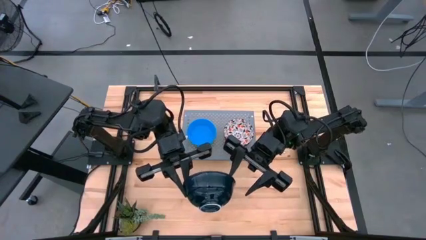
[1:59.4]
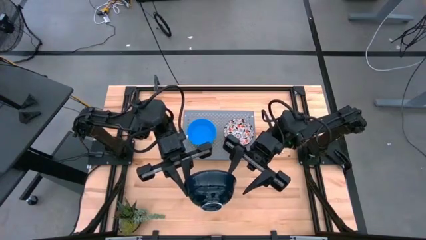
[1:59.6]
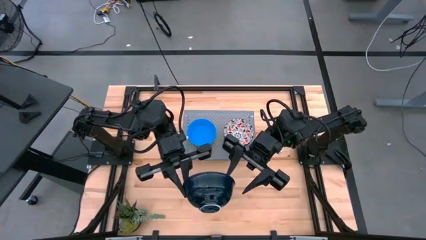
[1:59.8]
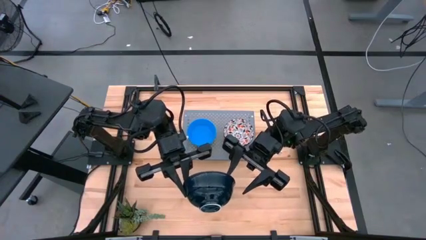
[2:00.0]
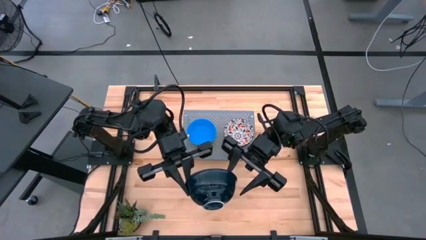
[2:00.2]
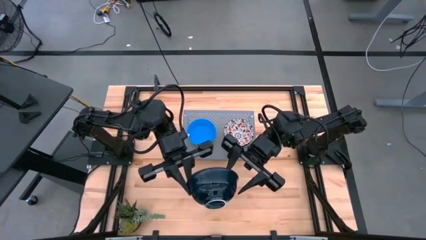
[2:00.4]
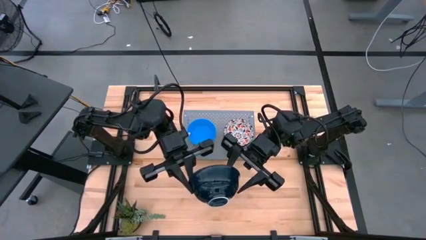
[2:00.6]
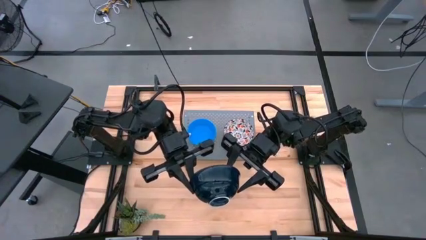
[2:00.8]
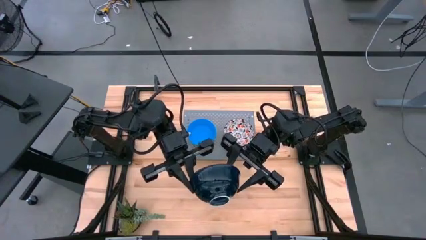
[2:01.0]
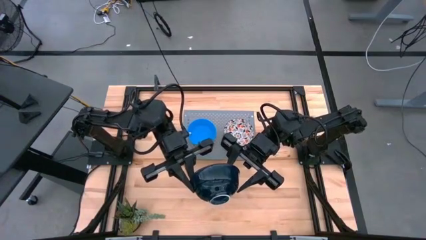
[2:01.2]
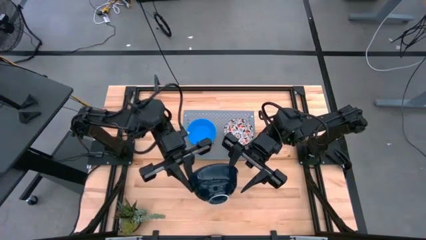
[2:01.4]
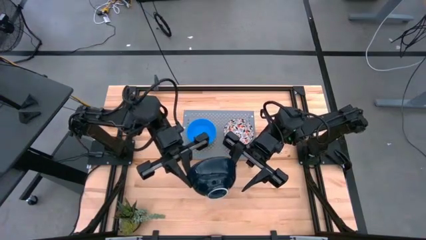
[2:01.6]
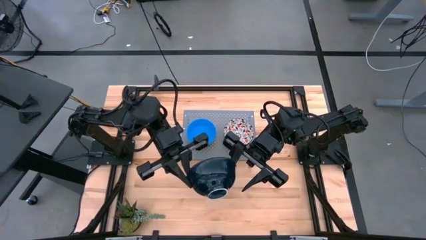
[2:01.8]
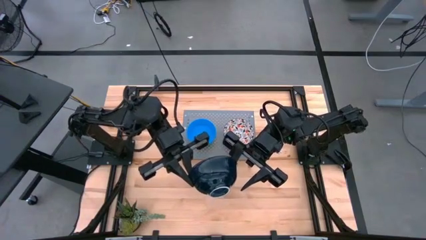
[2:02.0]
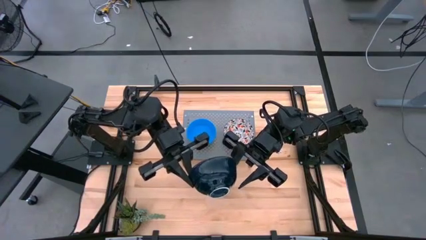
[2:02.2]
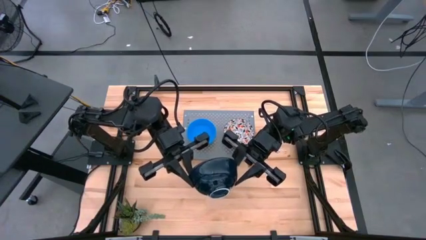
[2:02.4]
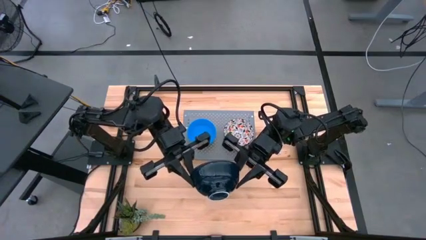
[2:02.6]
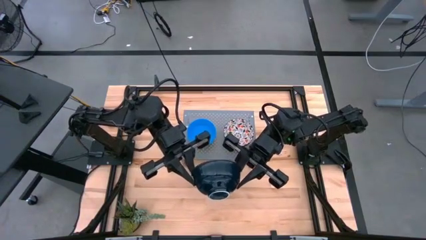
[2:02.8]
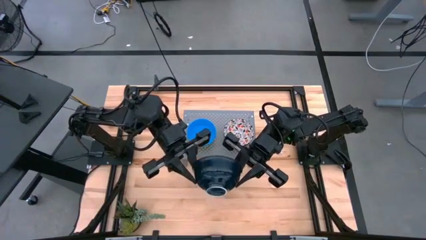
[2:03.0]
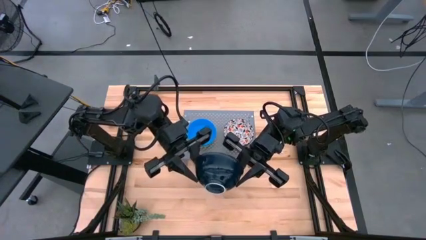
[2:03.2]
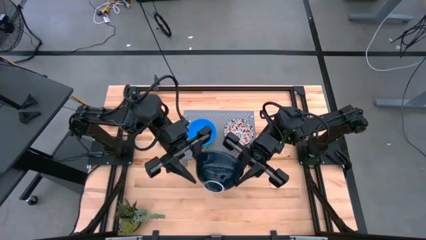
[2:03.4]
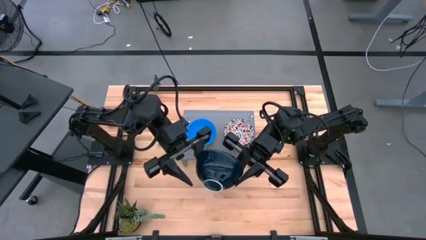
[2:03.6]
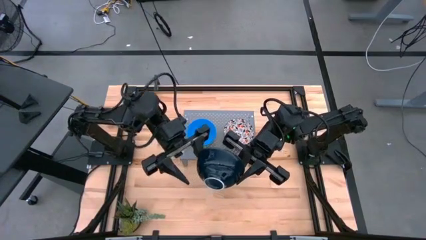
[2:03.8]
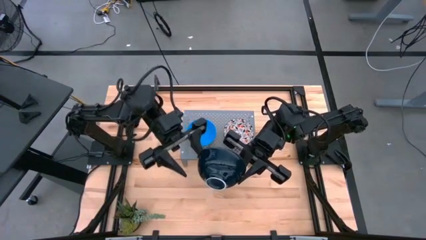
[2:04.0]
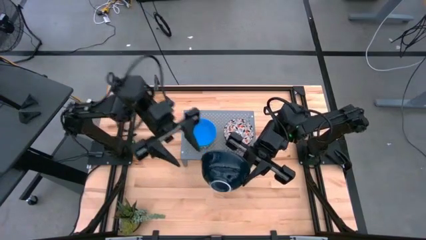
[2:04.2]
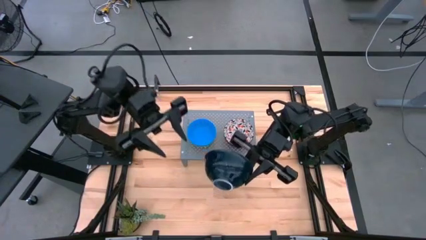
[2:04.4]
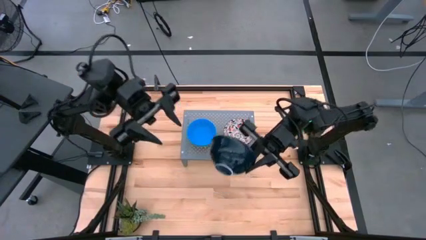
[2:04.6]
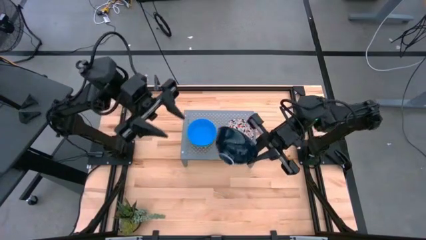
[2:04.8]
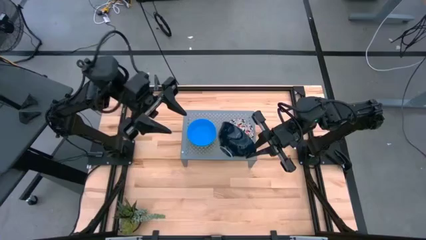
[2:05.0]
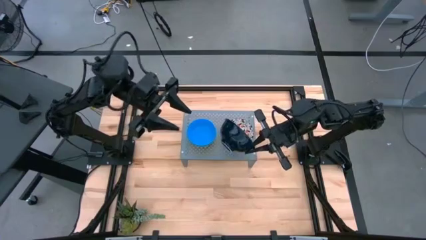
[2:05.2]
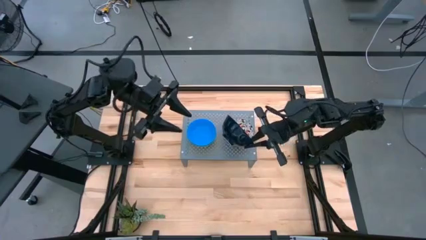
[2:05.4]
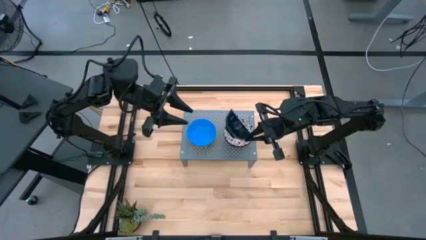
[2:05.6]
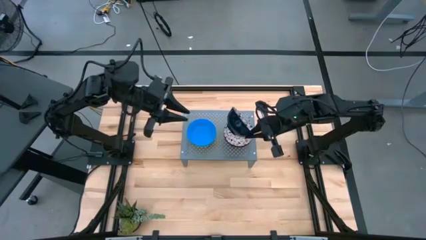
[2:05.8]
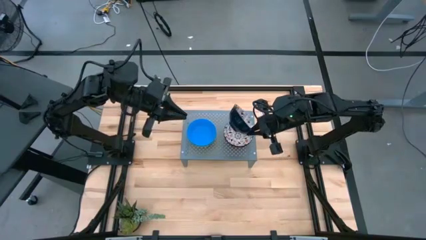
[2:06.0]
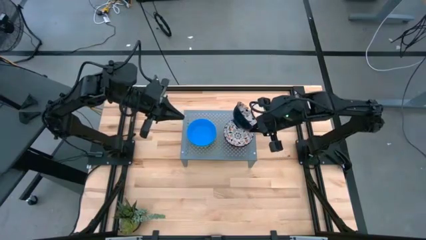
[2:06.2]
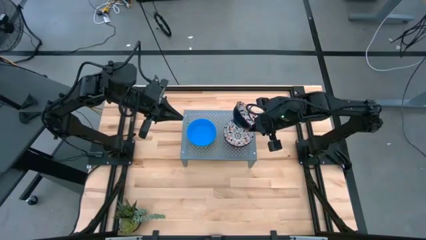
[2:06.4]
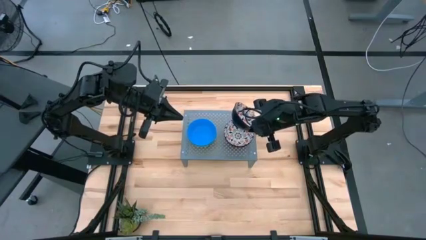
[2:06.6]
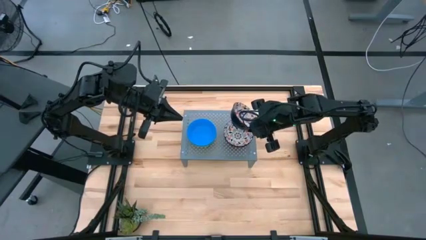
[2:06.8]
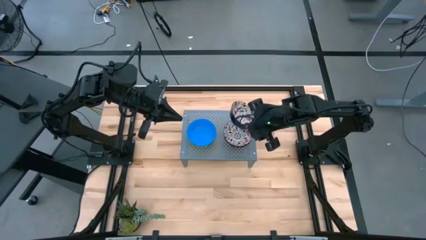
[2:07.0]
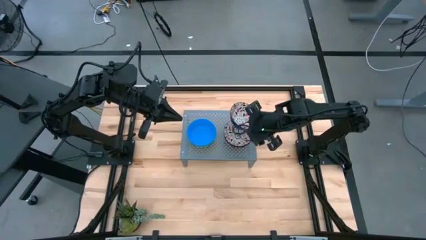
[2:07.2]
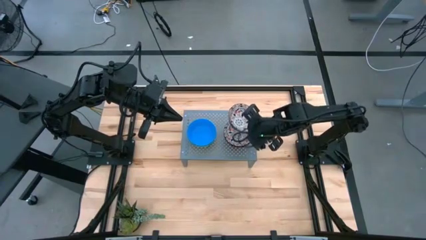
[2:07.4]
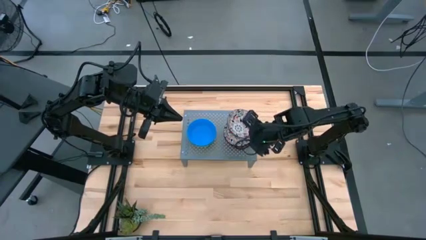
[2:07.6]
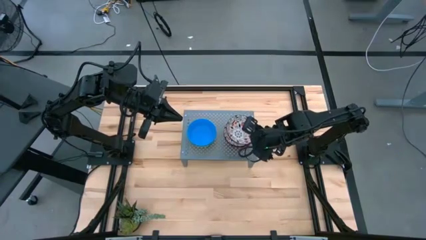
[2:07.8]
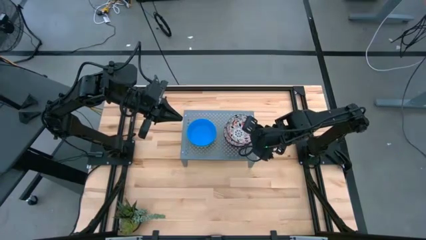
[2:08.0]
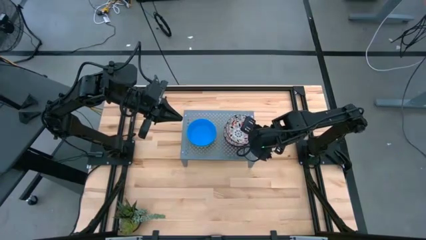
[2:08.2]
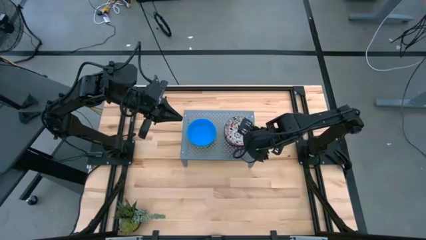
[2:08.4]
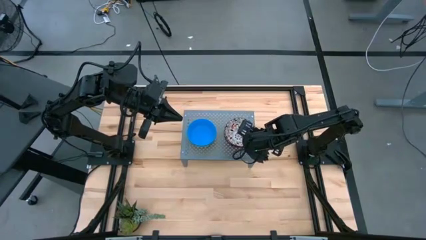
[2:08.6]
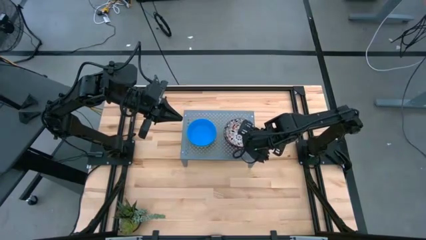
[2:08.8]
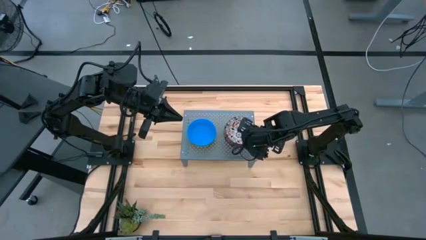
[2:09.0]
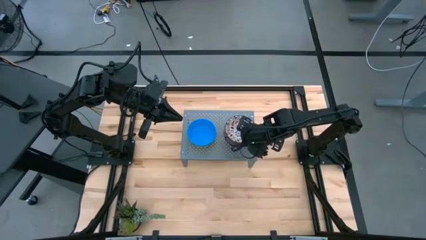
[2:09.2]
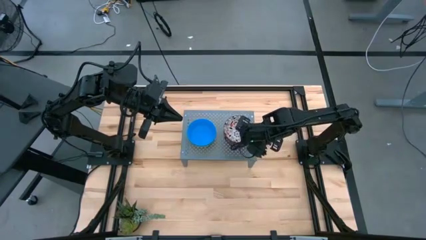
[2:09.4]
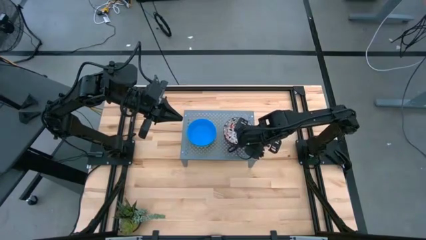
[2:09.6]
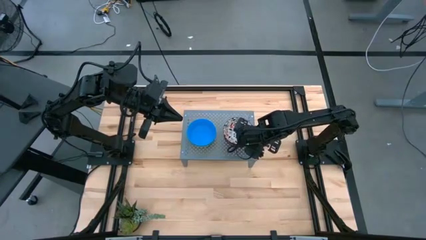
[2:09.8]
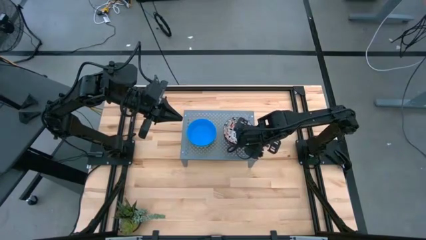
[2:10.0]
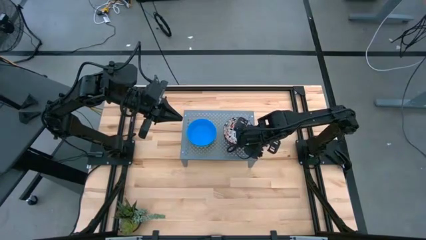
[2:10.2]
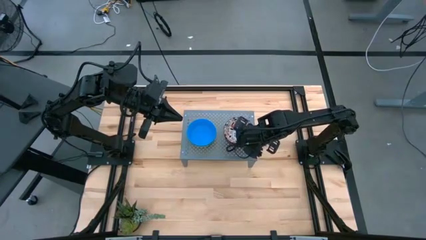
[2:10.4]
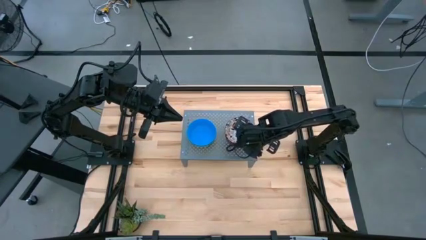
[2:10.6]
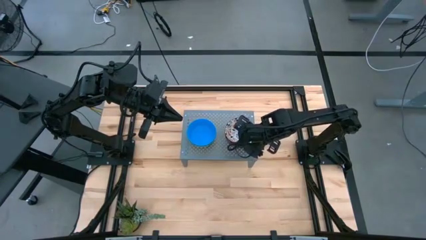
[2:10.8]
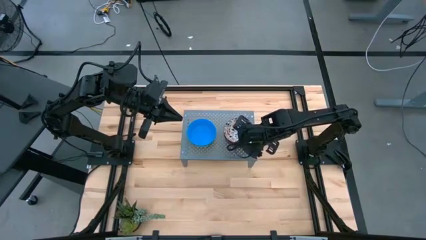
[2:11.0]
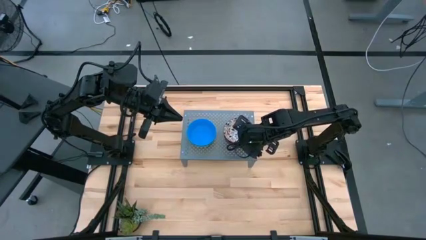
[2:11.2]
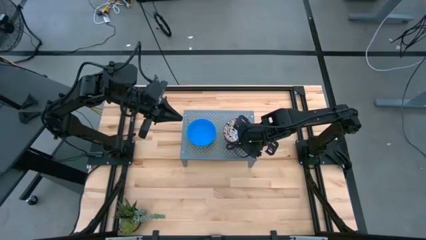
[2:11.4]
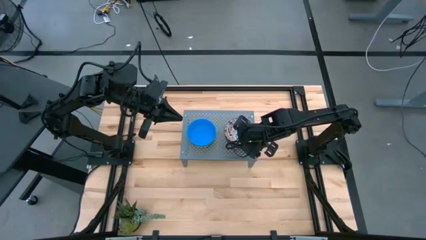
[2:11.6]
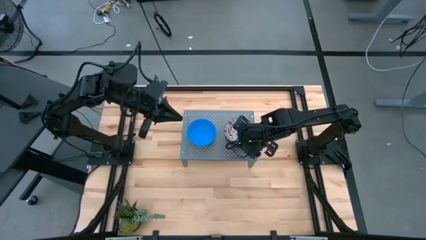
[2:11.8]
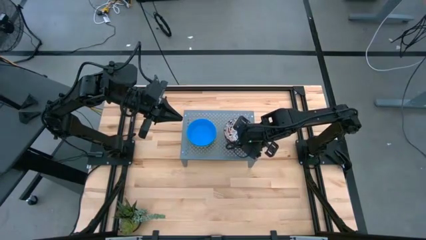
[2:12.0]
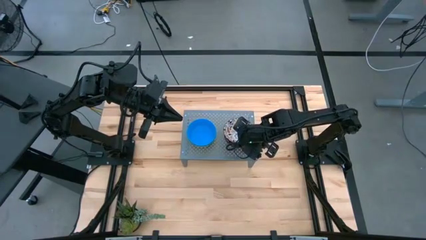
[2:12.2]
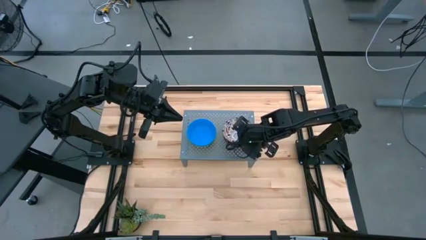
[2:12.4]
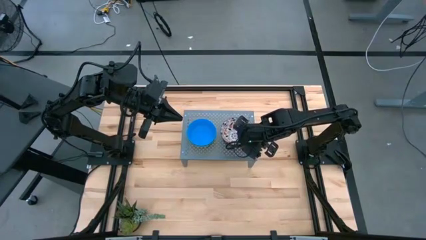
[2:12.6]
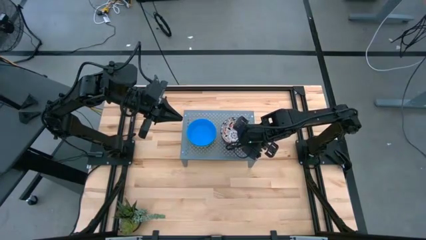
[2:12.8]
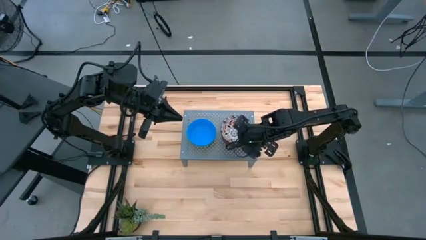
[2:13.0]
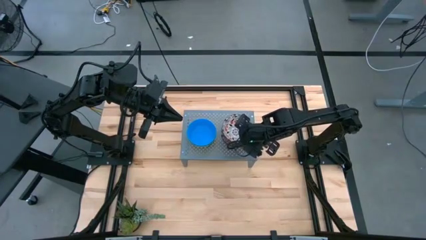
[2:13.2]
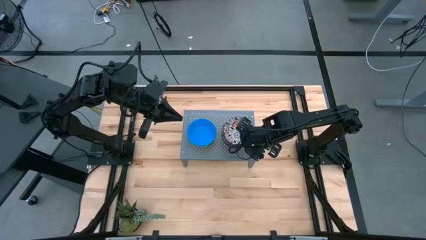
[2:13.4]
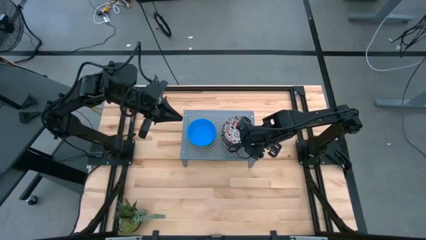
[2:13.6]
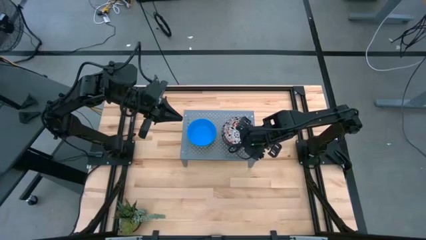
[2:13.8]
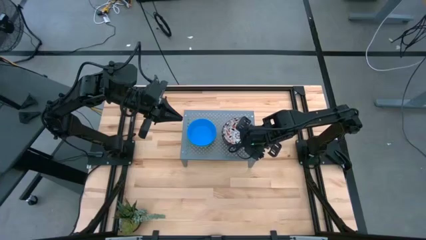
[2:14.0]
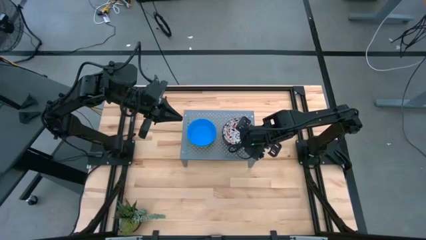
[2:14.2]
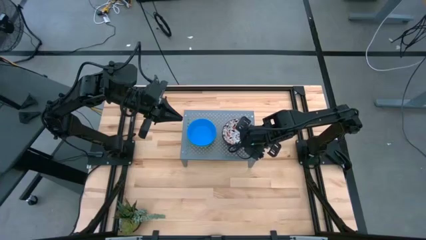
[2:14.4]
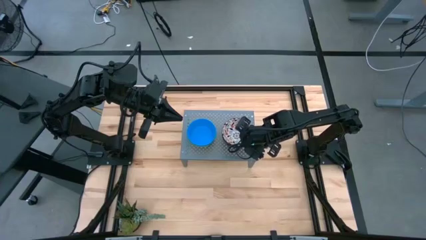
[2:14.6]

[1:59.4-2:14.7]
Task: Pick & Place Mini bowls
Stack the white patterned bowl on top of the white patterned bowl on the shelf

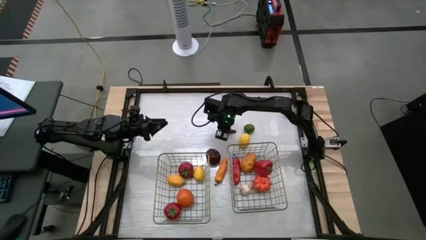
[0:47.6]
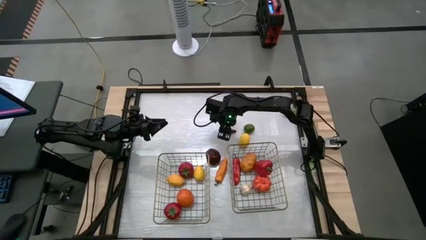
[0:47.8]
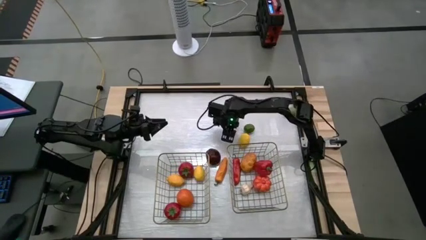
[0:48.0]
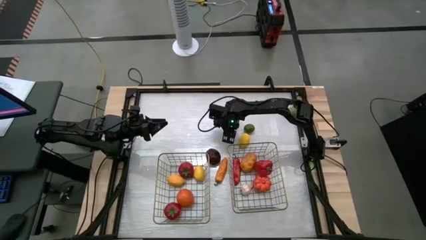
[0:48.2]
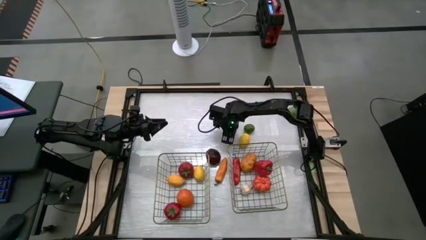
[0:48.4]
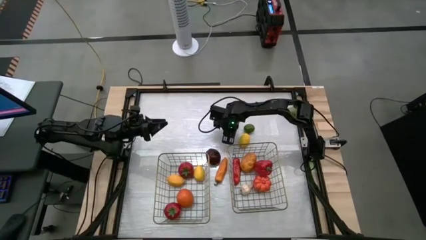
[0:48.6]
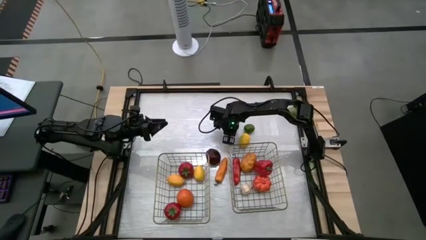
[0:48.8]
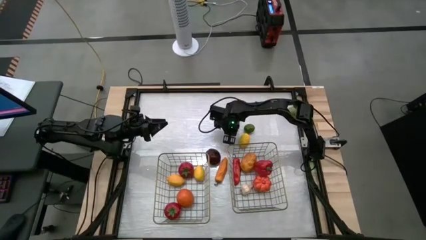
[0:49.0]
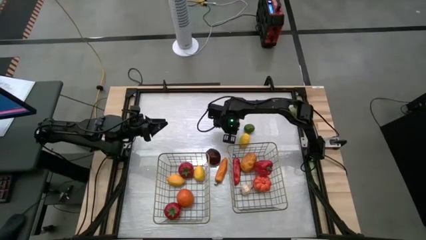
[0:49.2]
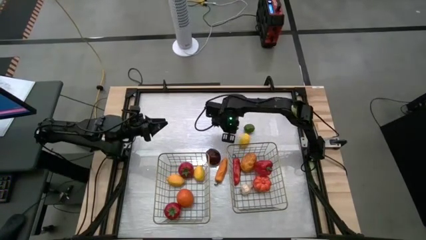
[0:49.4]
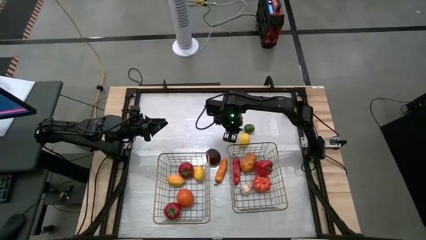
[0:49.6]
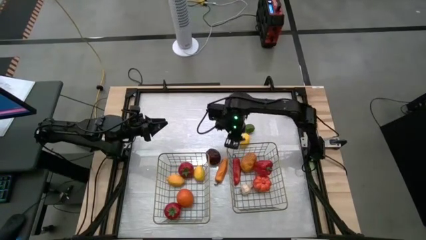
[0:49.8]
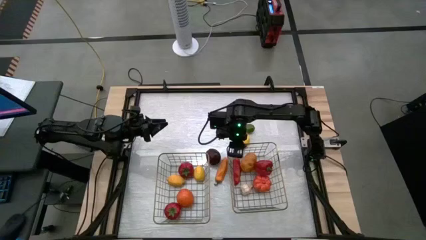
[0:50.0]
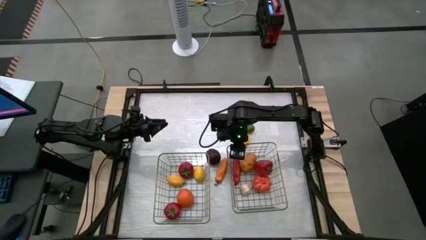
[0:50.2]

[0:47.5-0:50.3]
Task: Sort produce into baskets
Put the eggplant into the right brown wire basket
